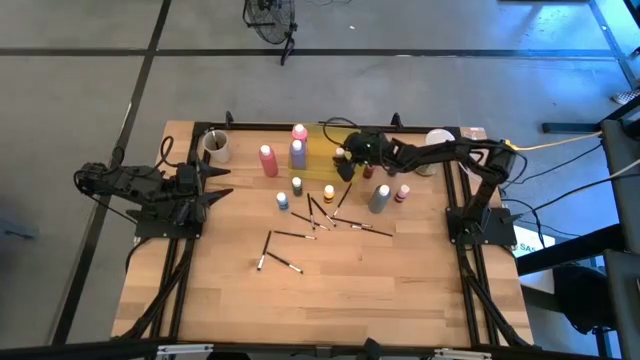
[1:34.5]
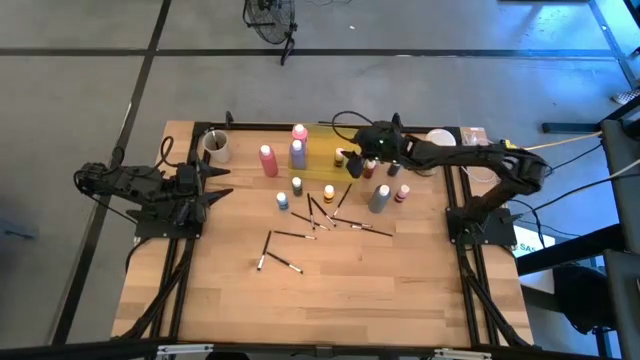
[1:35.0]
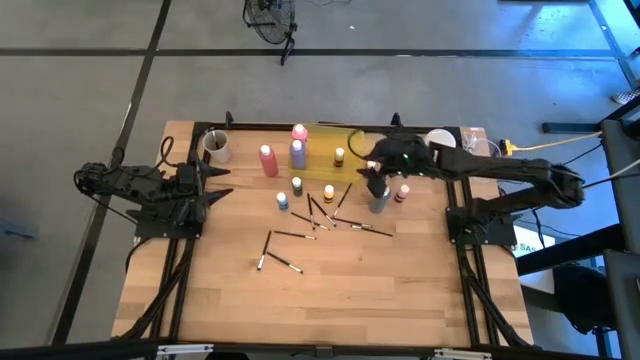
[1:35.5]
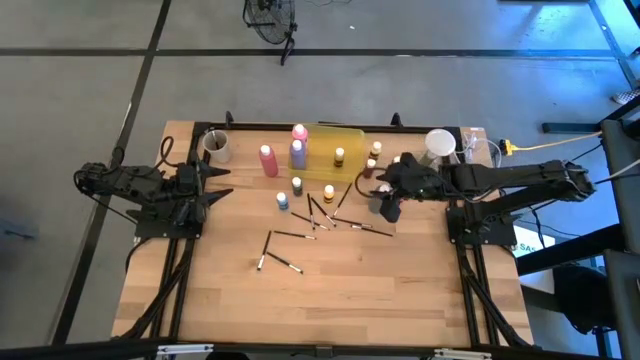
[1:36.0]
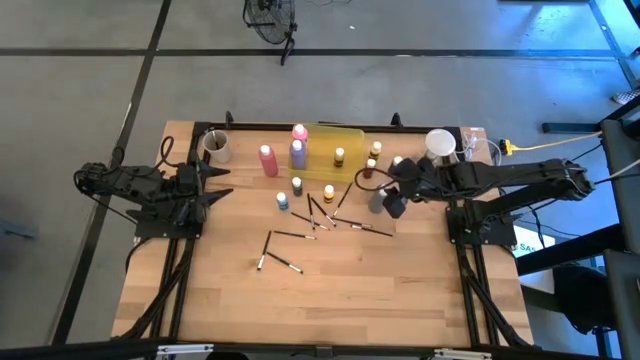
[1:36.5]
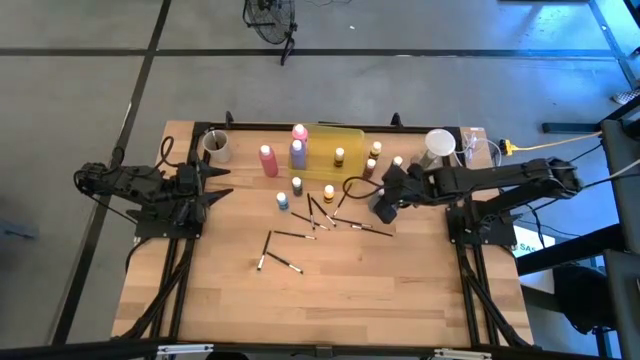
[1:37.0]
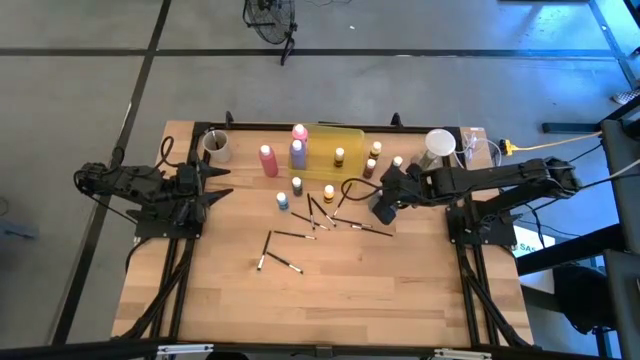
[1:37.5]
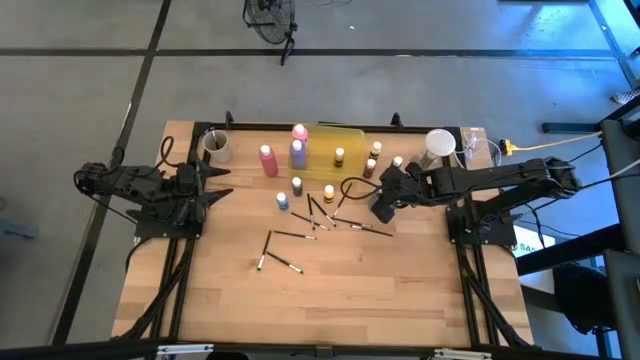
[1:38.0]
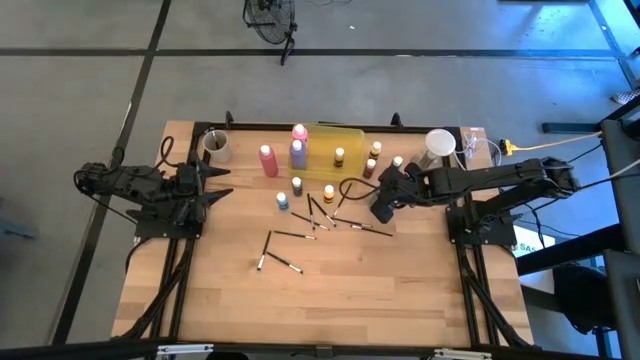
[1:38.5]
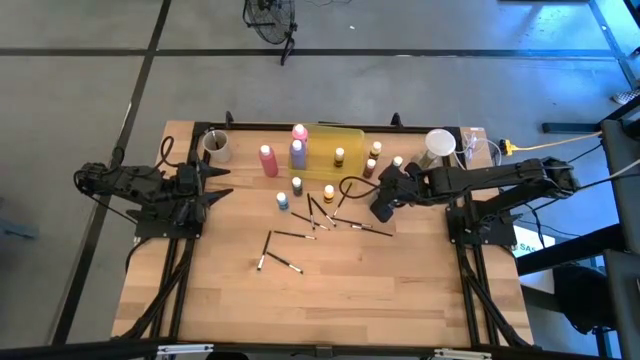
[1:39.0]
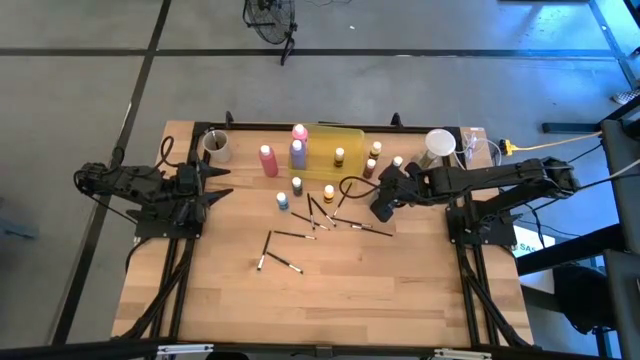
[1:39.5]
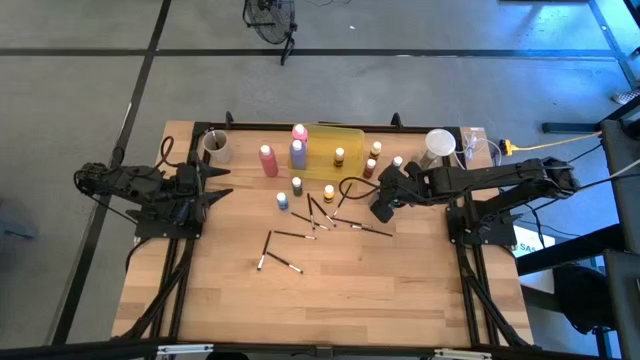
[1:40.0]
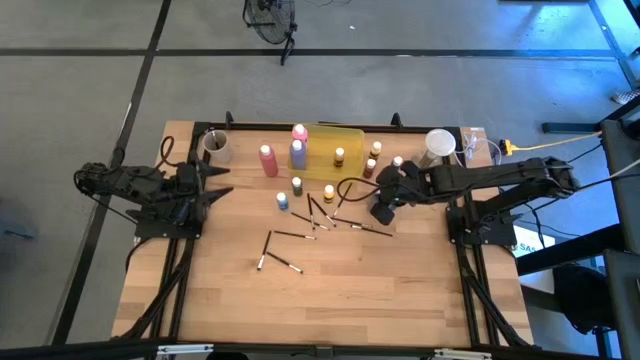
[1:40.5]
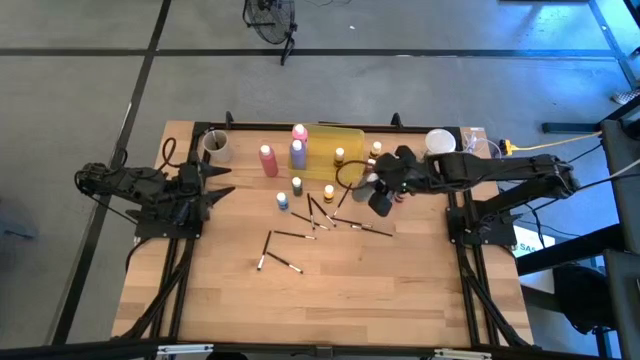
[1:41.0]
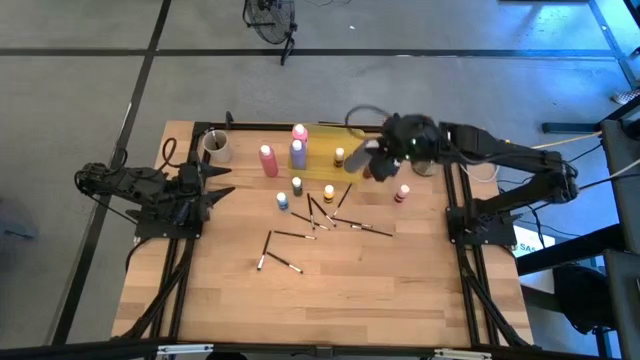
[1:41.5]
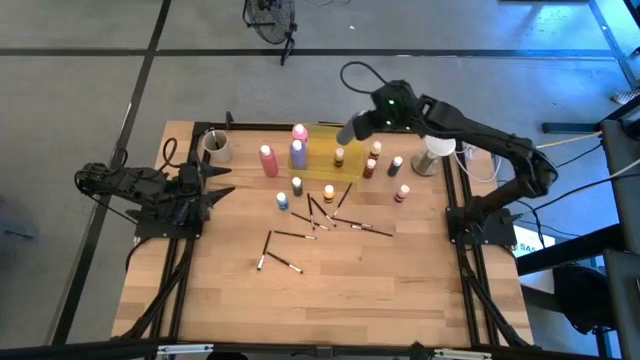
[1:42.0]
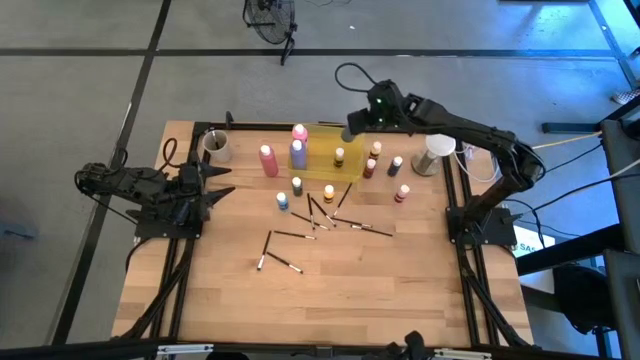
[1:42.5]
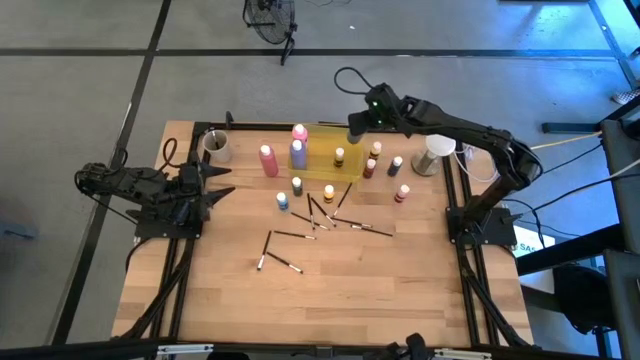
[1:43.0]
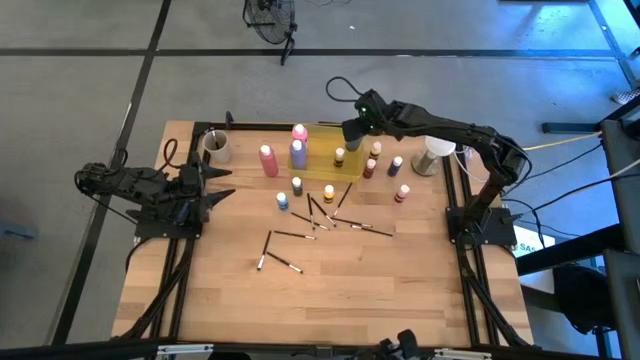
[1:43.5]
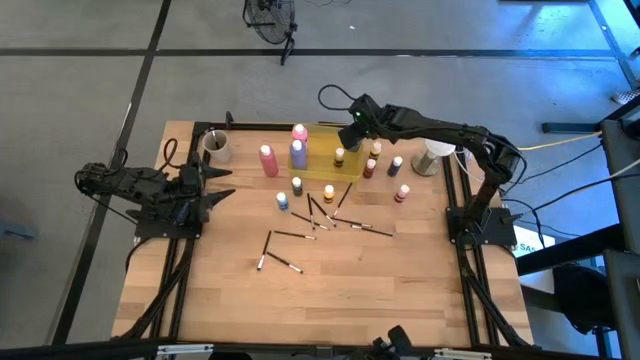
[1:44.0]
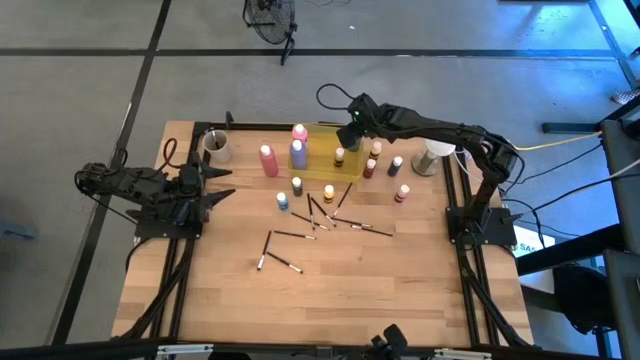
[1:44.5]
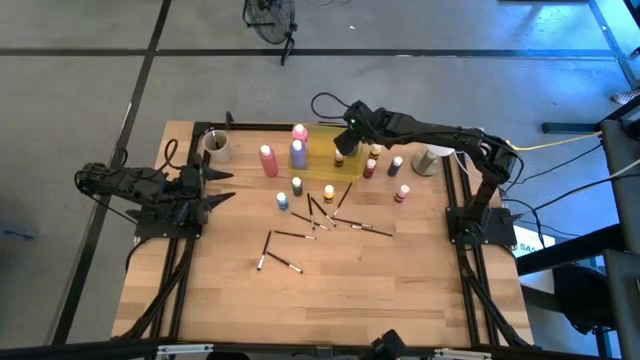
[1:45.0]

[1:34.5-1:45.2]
Task: Pick & Place Paint Supplies
Put the large blue paint bottle into the yellow bin

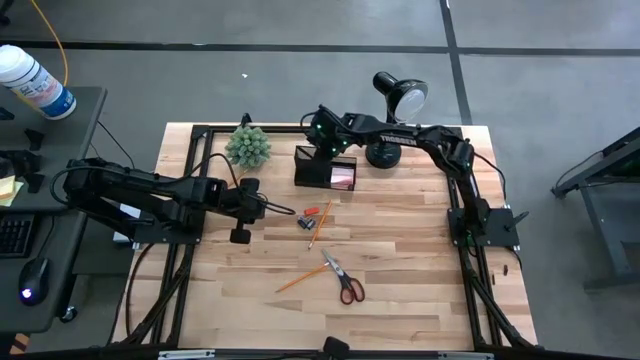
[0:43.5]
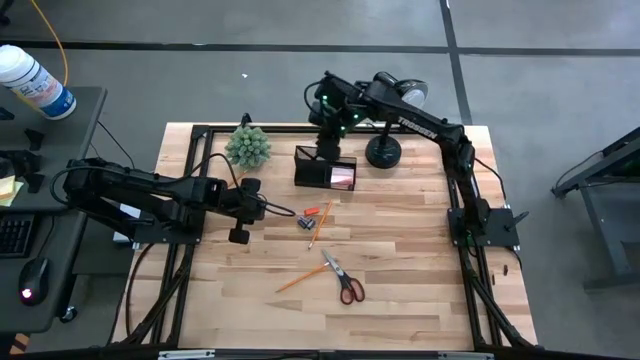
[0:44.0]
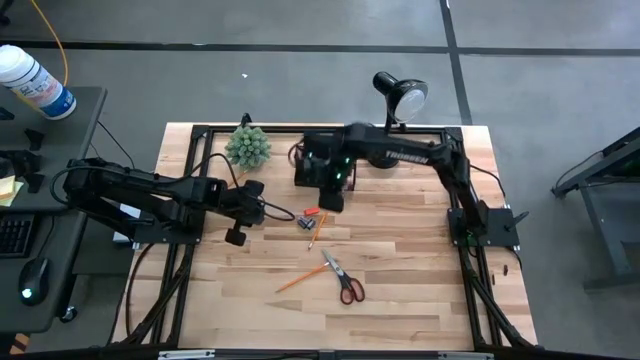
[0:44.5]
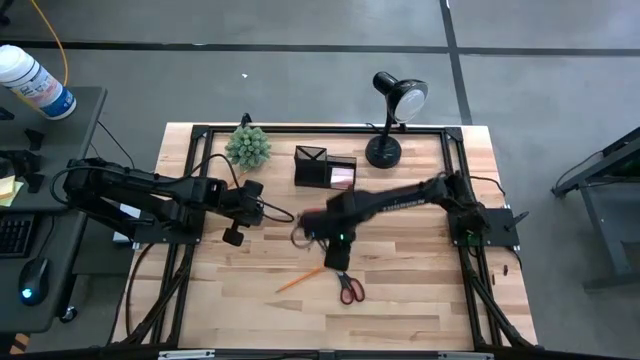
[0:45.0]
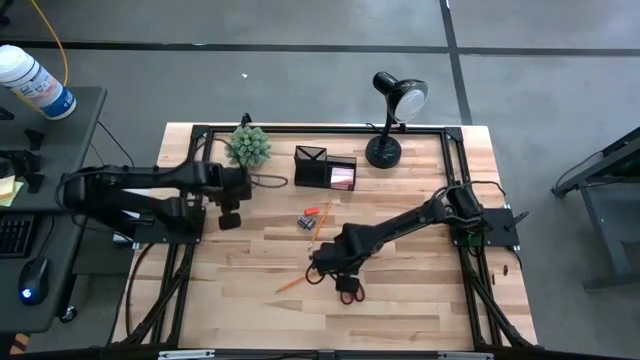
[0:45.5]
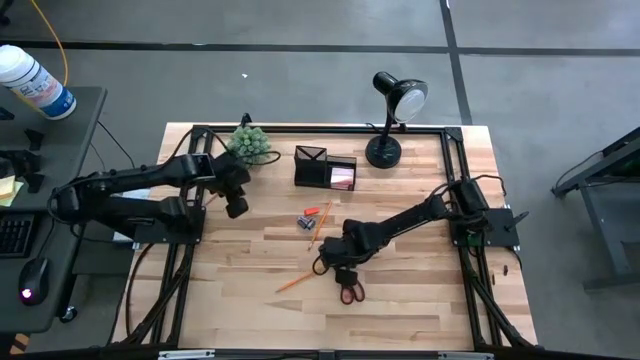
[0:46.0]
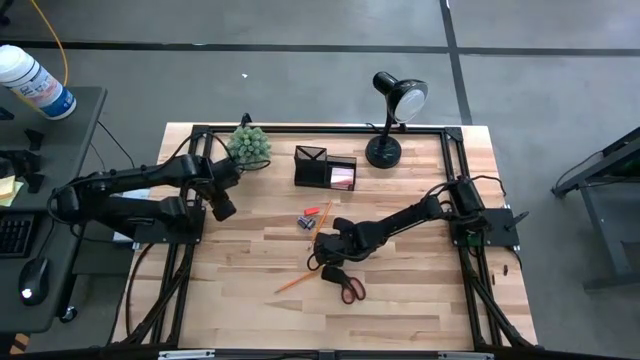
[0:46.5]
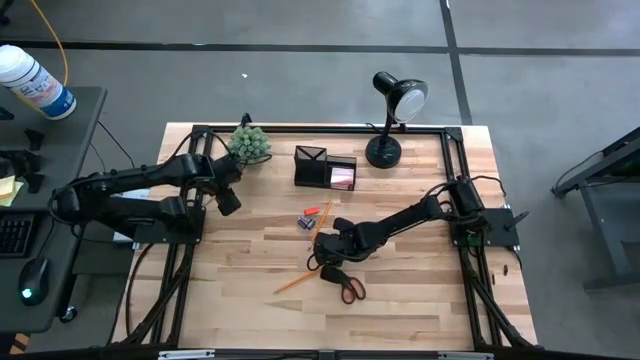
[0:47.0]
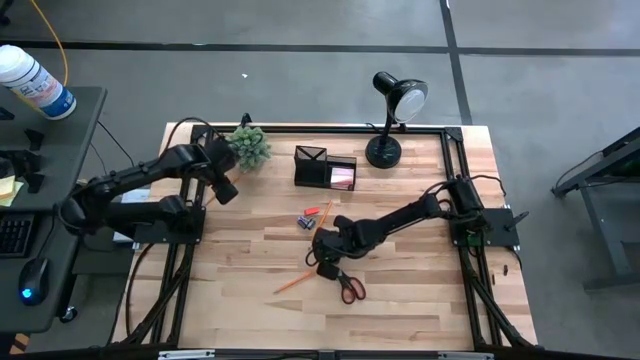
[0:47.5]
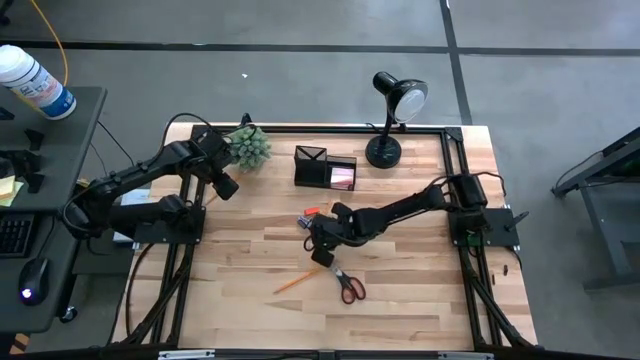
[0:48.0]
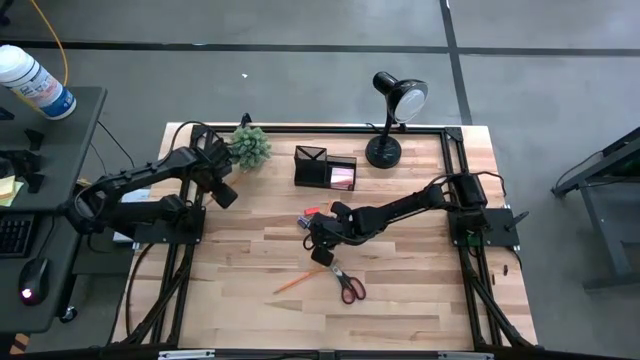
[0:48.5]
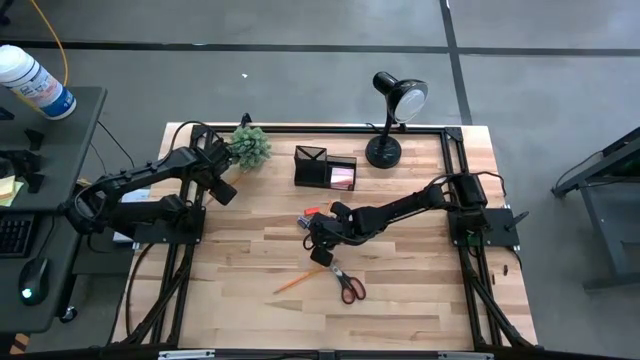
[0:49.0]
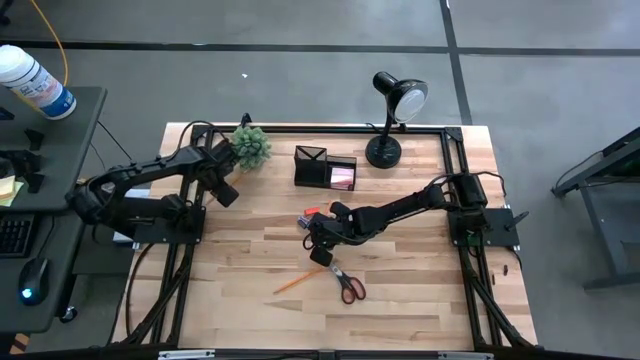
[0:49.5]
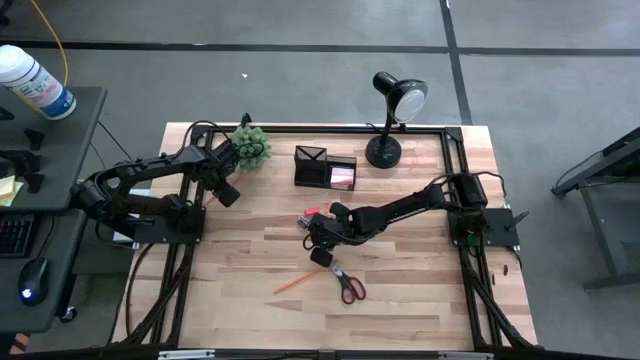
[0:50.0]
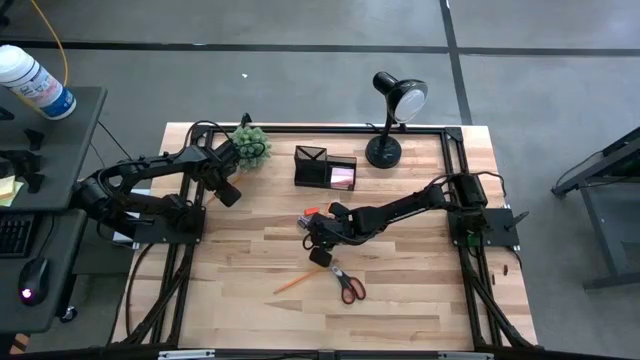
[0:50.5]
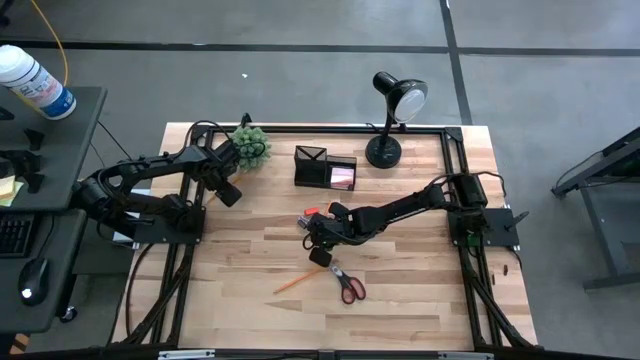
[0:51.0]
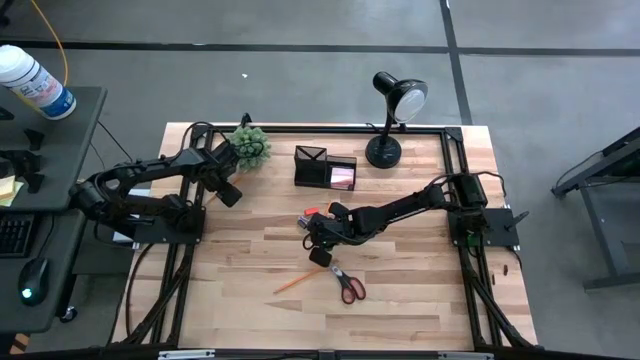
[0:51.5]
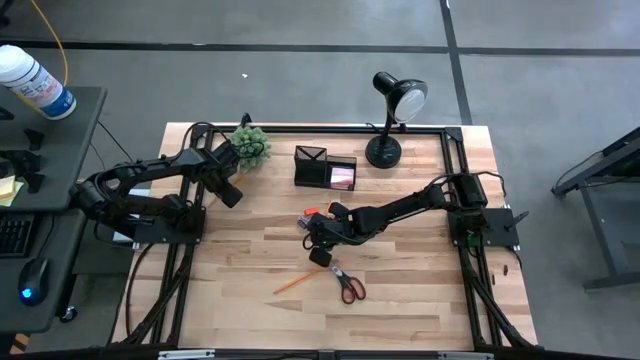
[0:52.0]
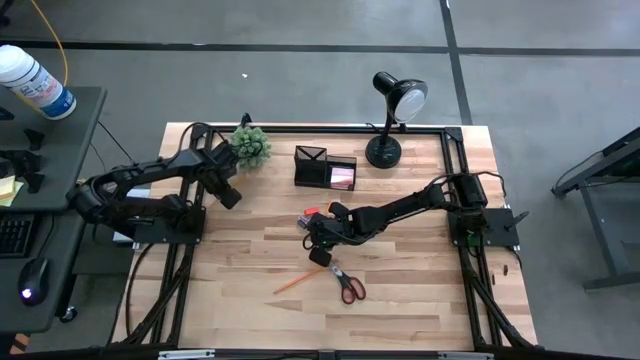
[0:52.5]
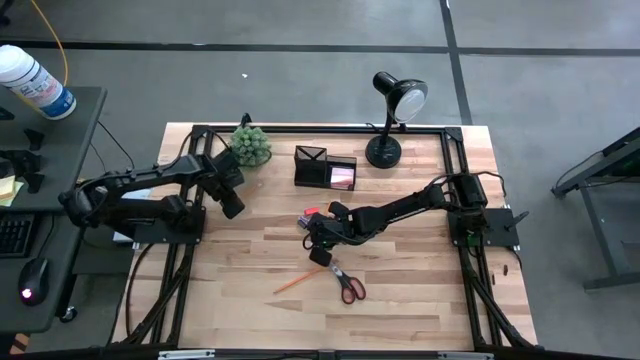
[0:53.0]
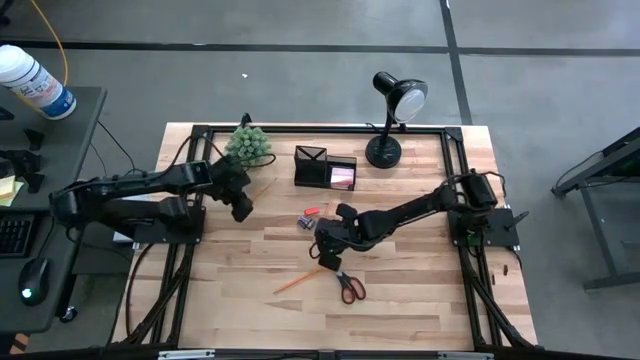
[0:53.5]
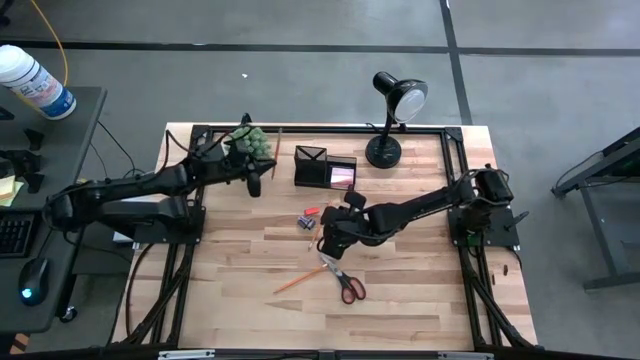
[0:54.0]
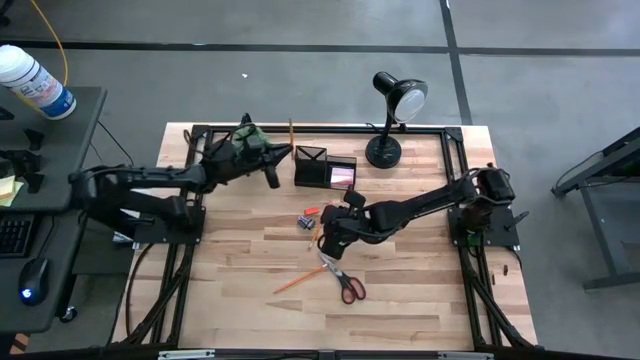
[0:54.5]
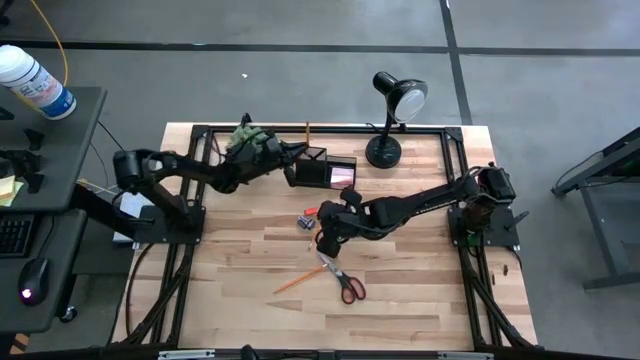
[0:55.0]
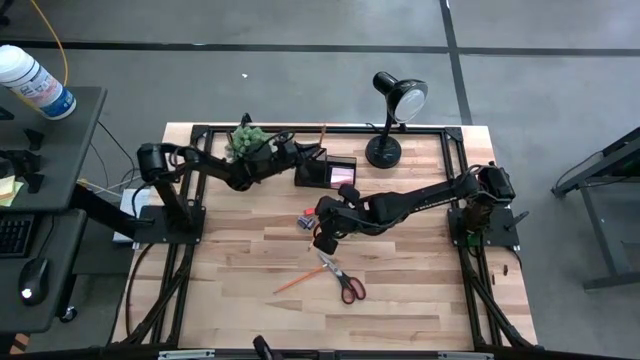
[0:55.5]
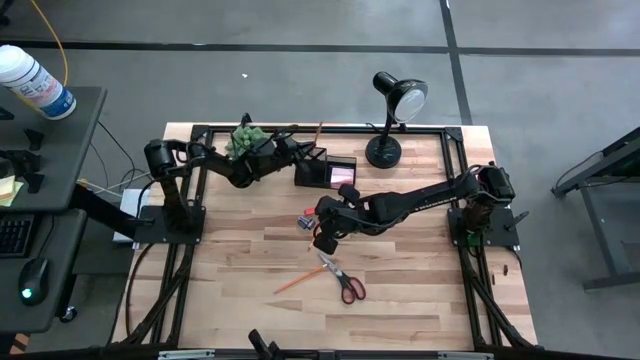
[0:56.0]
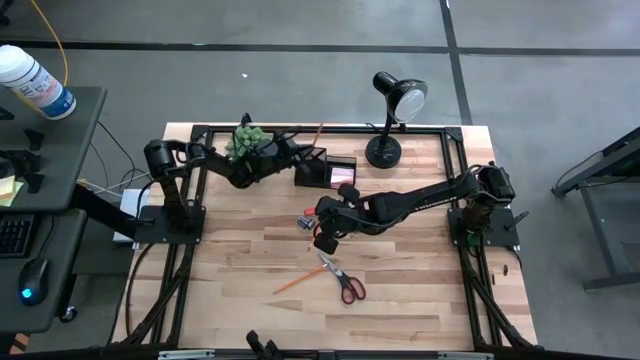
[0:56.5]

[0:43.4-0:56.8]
Task: Pick and place office supplies into organizer
Put the top pencil into the desk organizer
